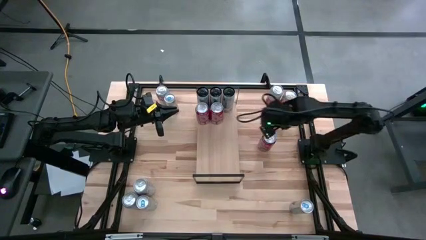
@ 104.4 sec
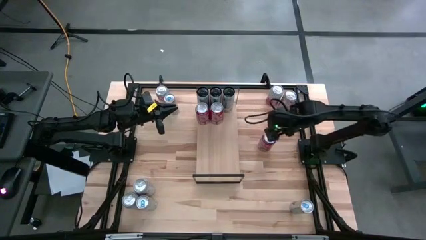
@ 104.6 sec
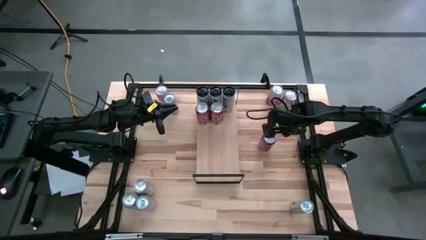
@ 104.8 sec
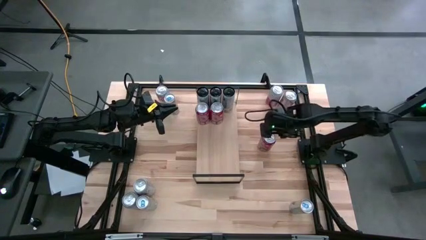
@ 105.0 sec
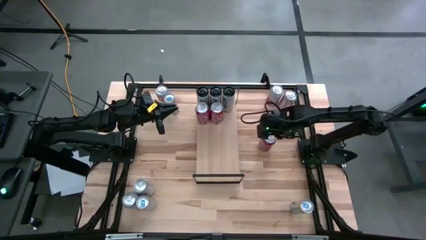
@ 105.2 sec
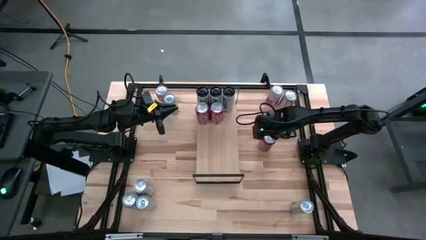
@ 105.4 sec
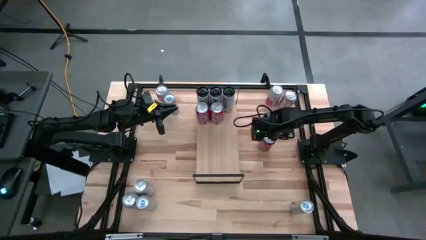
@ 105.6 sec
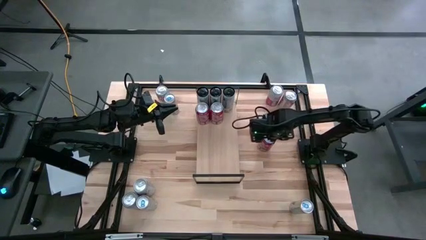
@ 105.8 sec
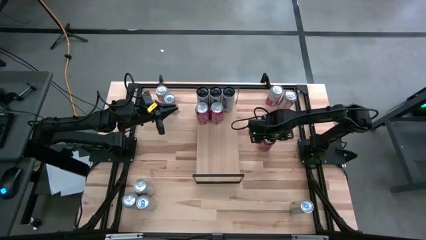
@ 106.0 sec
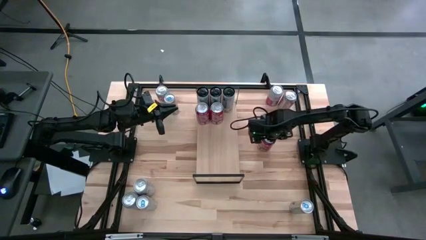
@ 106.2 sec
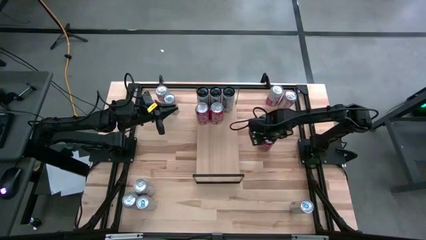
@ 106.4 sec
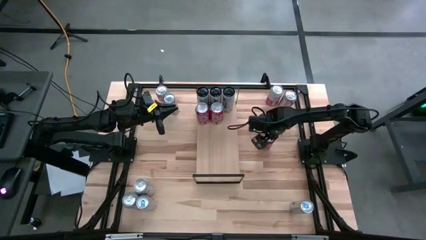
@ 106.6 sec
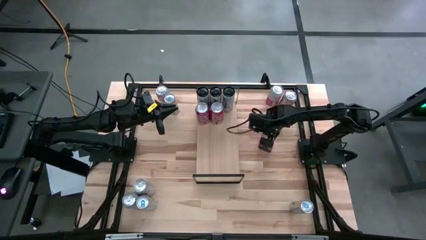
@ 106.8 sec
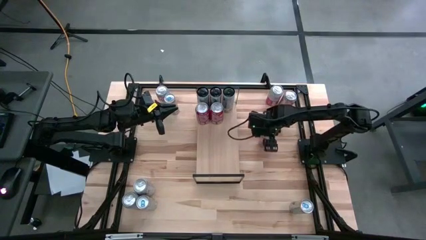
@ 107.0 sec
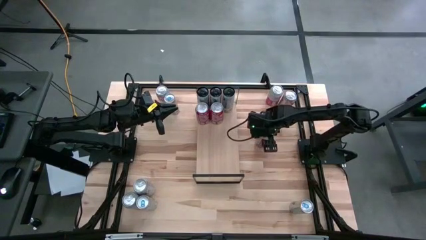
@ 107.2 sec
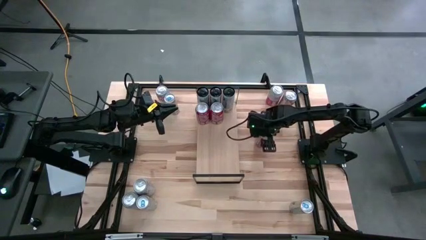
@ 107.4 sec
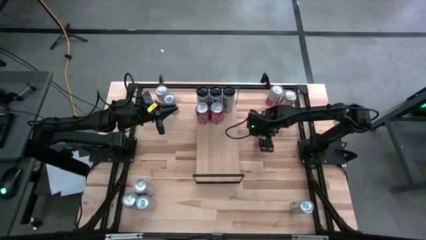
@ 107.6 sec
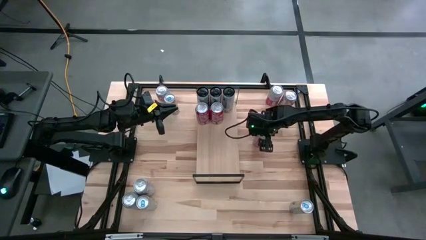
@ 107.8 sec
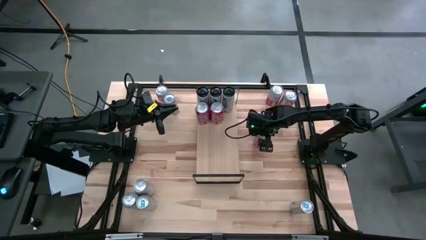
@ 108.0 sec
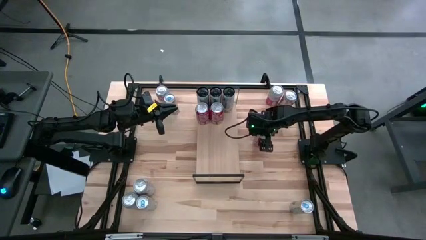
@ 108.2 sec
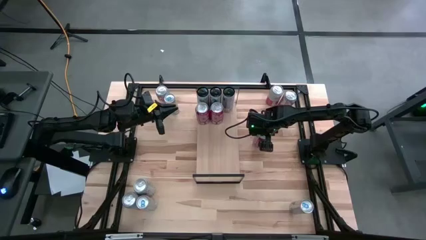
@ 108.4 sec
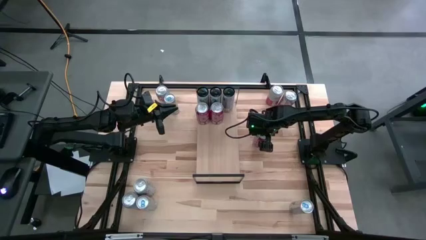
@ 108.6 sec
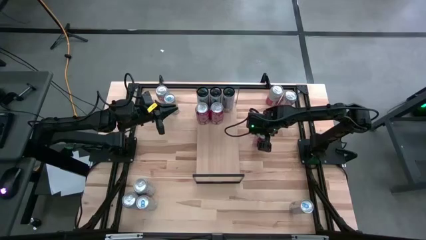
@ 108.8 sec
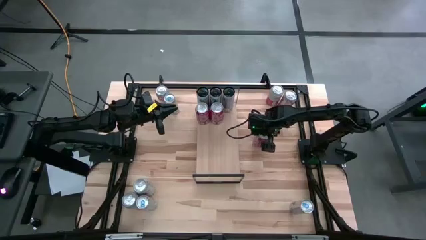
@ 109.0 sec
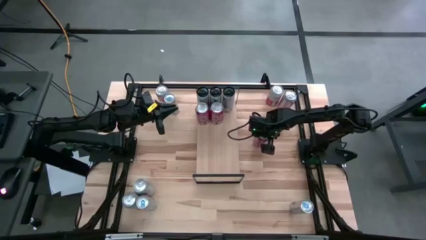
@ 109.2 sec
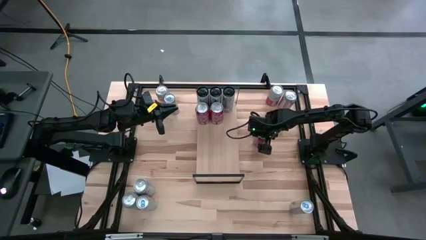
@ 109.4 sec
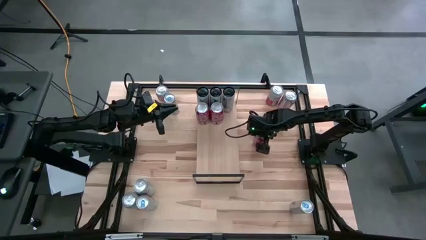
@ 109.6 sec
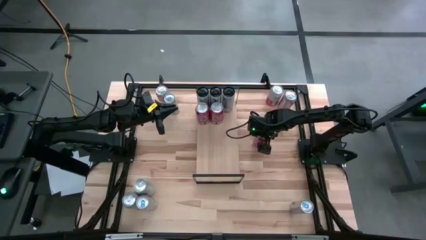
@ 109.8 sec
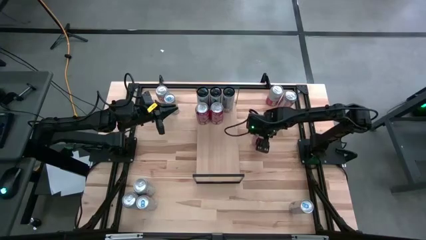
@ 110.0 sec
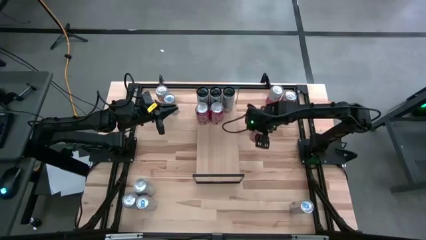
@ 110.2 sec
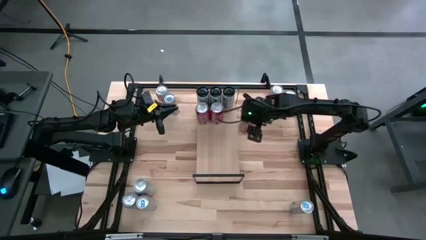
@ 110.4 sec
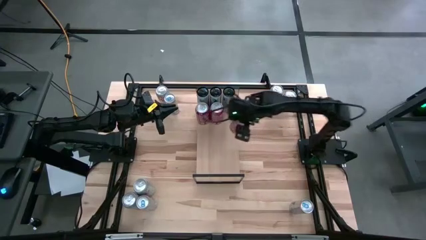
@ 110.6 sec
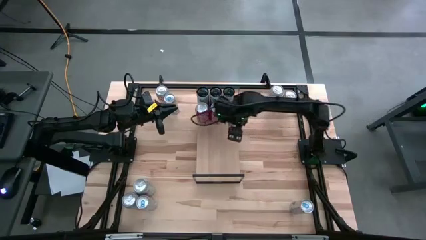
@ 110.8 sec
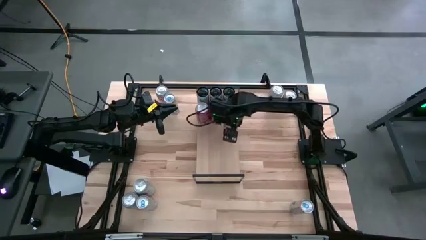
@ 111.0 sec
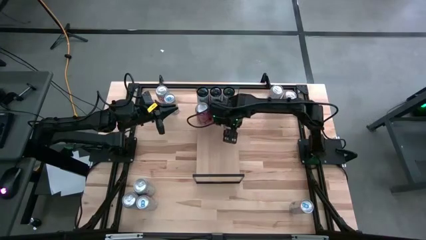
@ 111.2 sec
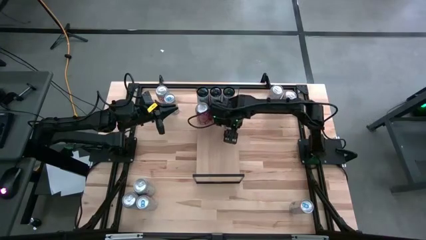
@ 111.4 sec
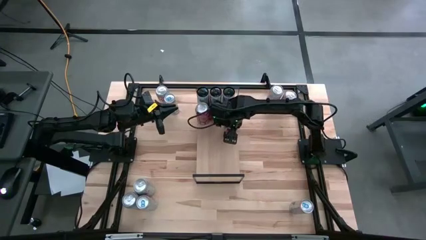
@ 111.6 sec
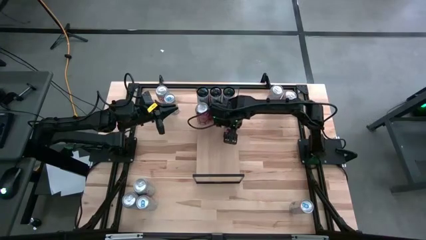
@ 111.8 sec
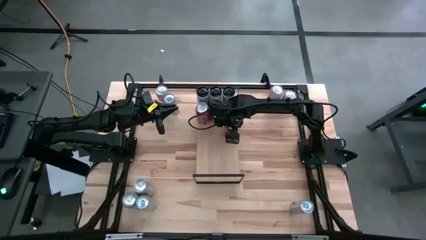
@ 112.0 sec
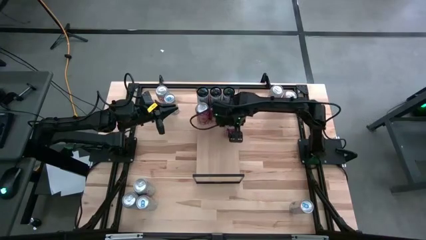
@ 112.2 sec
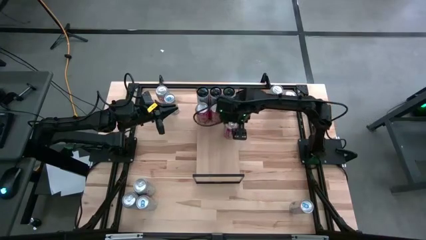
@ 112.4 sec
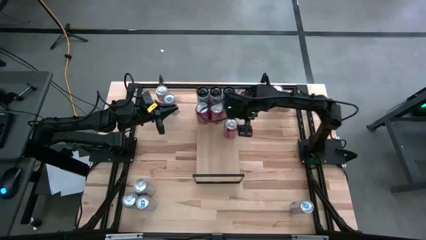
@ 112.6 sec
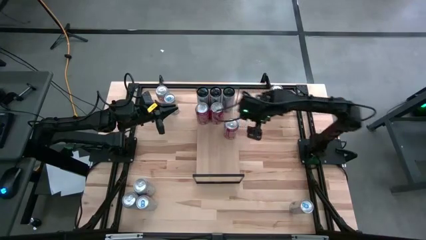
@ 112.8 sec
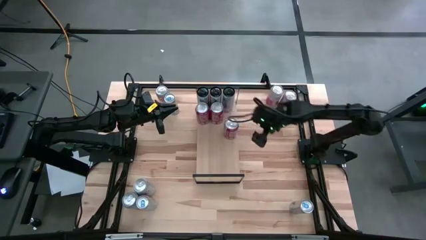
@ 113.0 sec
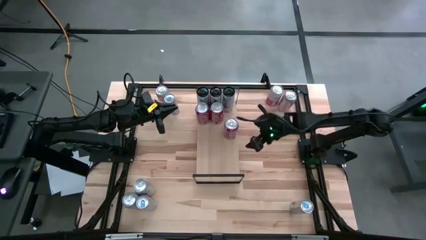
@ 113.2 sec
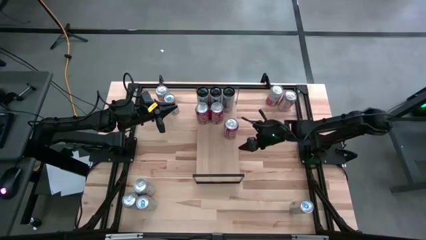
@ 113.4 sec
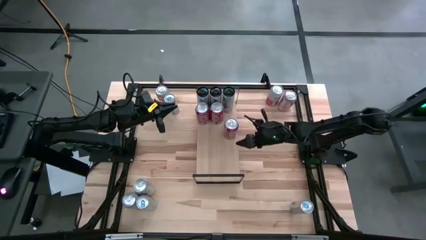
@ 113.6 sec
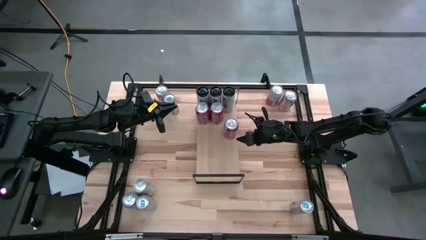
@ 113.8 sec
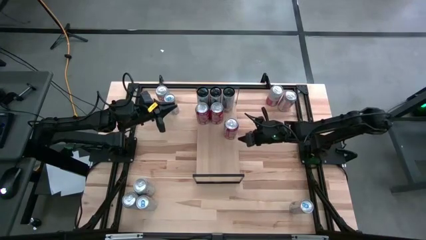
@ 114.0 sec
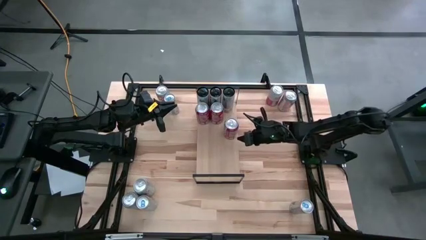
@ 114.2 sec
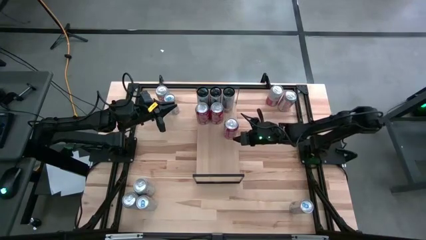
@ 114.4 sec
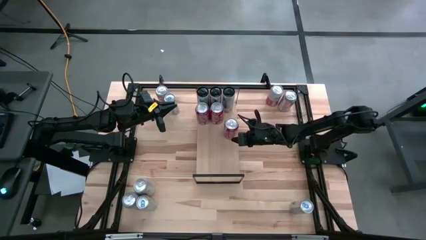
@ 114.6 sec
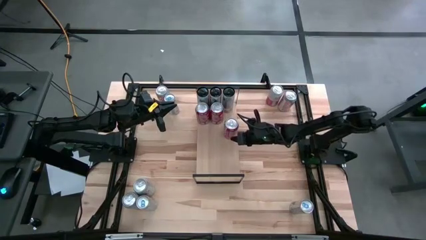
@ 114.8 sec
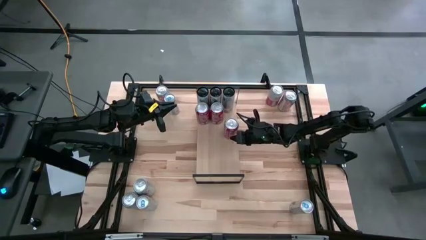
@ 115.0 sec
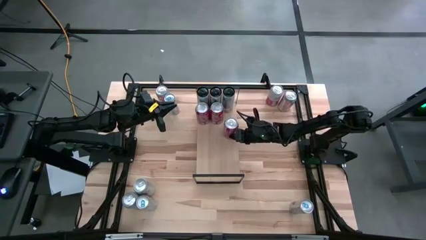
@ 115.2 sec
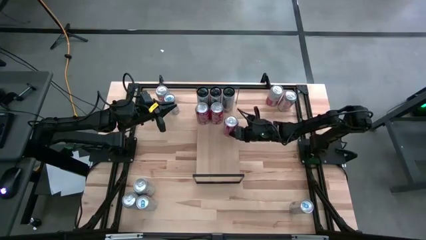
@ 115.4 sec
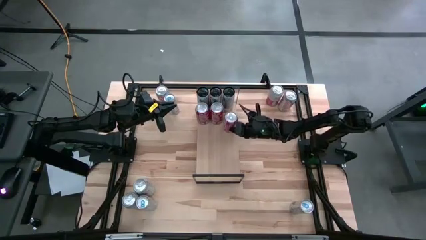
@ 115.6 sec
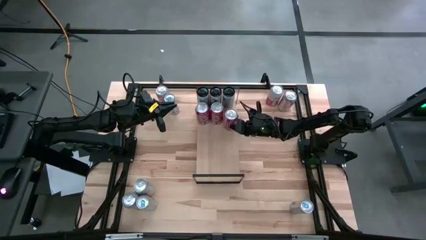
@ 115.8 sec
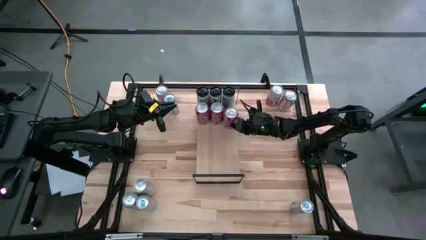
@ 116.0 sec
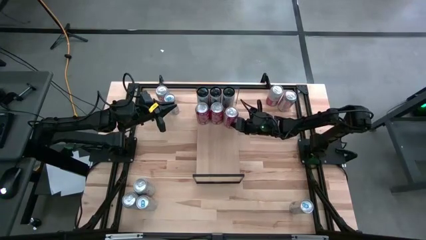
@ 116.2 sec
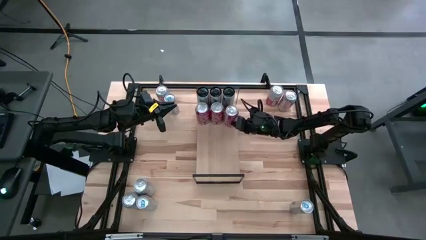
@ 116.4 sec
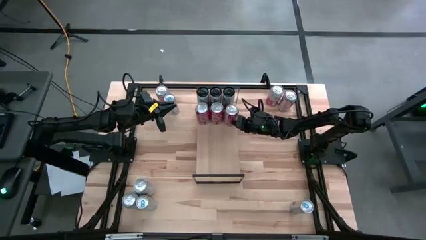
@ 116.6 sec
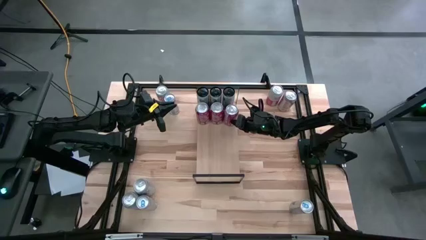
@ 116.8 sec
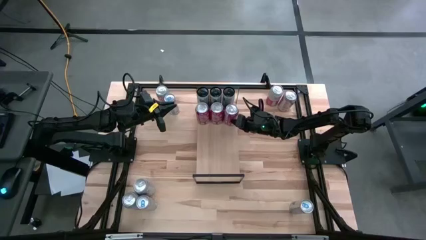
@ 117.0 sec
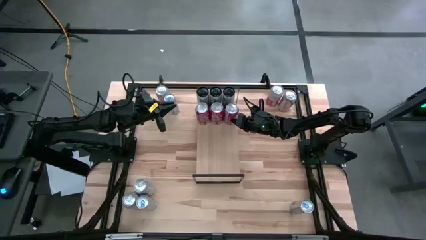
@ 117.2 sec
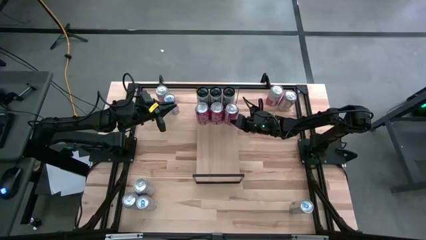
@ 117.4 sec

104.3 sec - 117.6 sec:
Task: Place canned beverage on shelf
Put the red-white soda can on the shelf aligned with the other red-white soda can

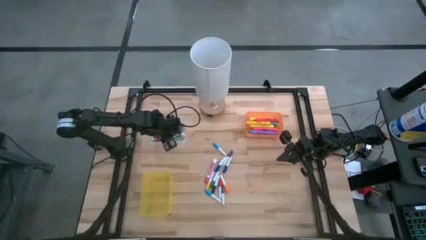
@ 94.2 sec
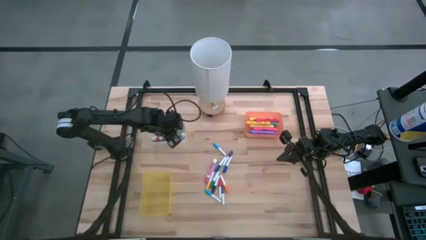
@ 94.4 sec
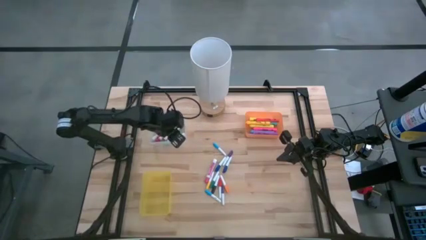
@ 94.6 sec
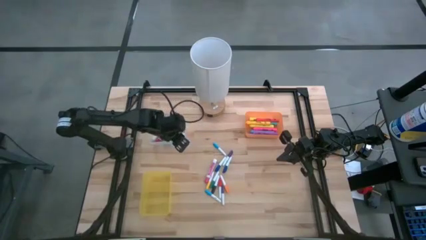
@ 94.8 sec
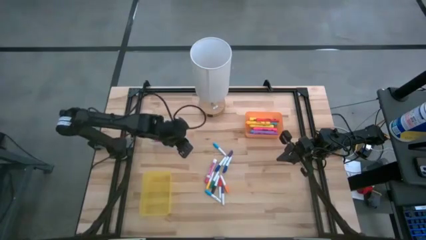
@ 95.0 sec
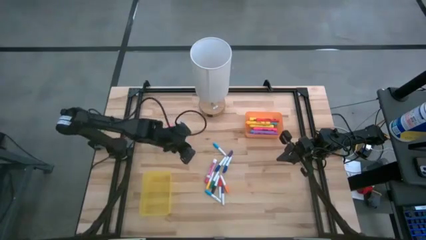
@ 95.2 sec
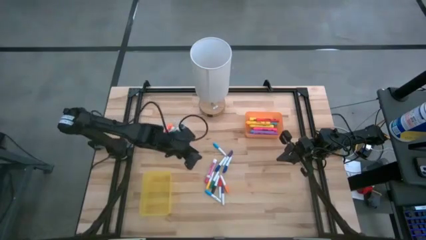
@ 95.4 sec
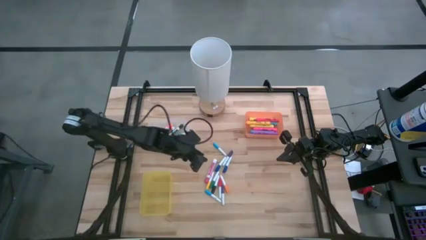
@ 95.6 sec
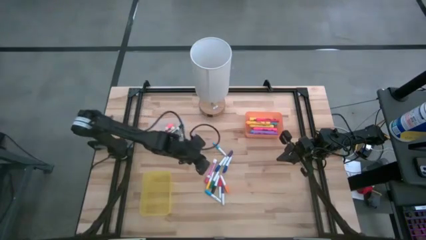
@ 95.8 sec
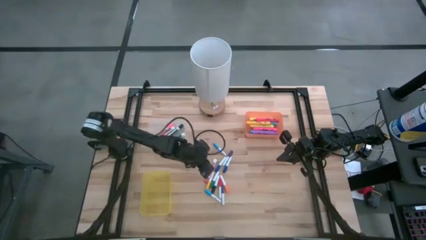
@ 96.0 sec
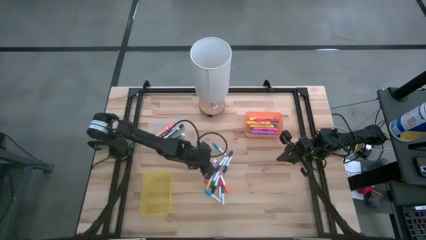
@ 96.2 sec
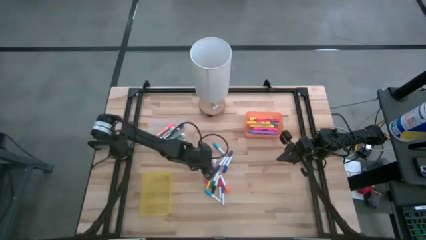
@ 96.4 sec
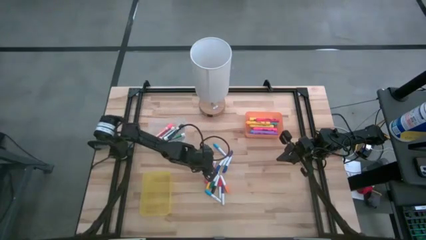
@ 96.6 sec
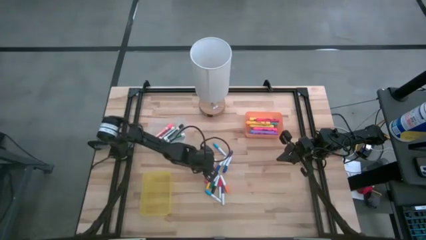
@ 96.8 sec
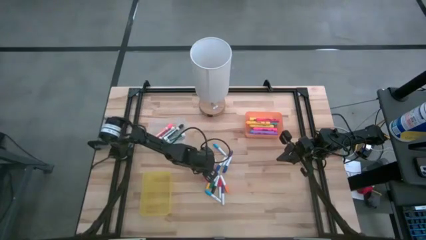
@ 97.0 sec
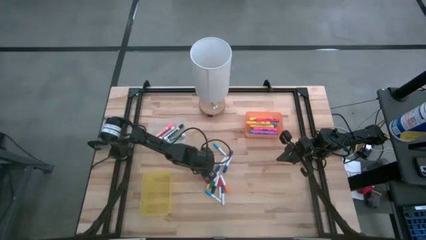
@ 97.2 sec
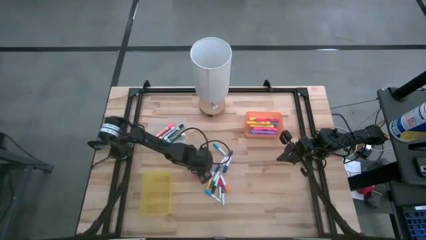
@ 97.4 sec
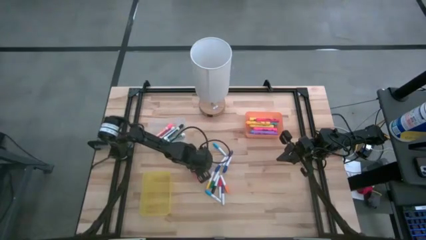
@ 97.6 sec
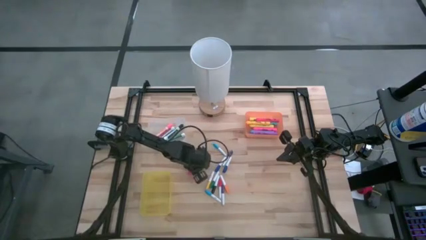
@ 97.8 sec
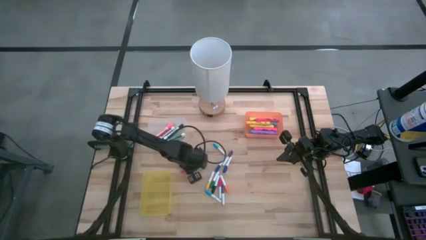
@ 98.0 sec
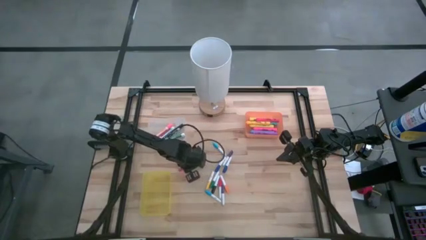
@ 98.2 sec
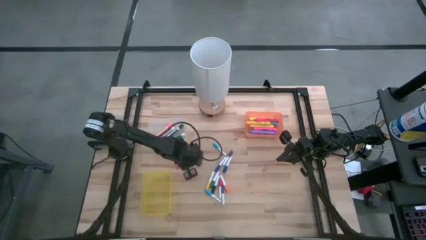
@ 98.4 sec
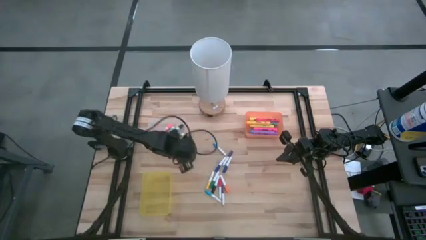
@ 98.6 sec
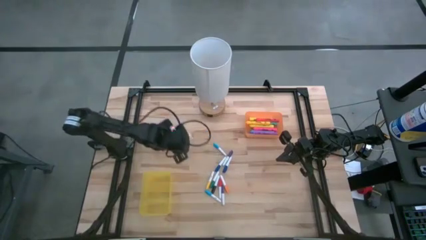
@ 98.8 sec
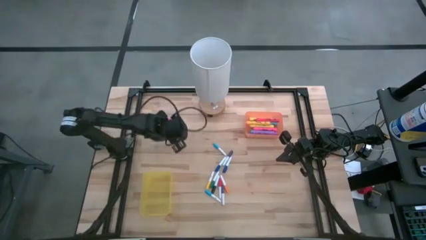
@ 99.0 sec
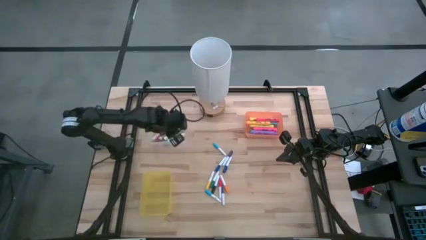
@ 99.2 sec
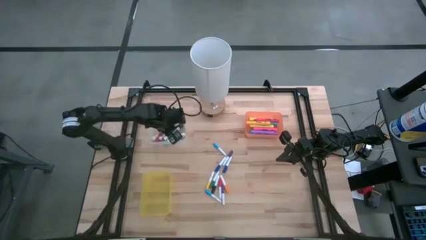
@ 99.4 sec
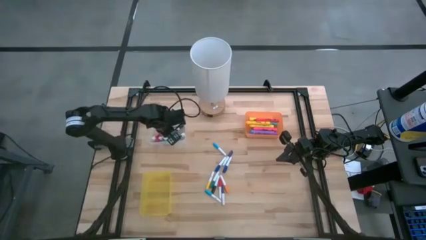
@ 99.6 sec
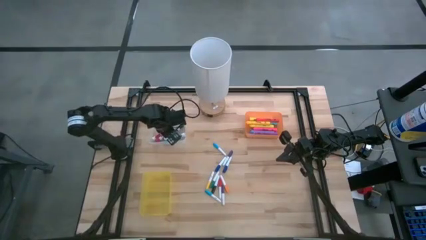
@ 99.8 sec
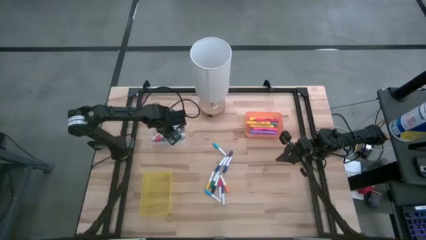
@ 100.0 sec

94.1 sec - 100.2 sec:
Task: Pick & Place Markers
Put the pink marker pen into the white bin
